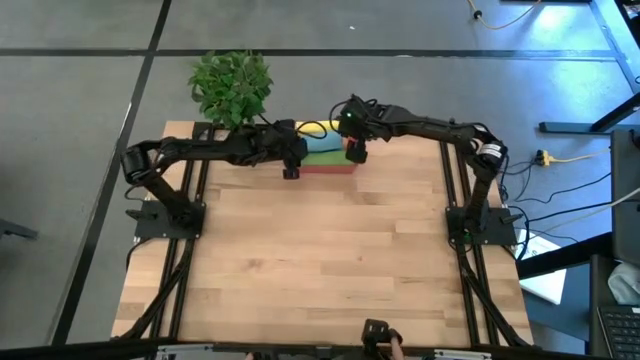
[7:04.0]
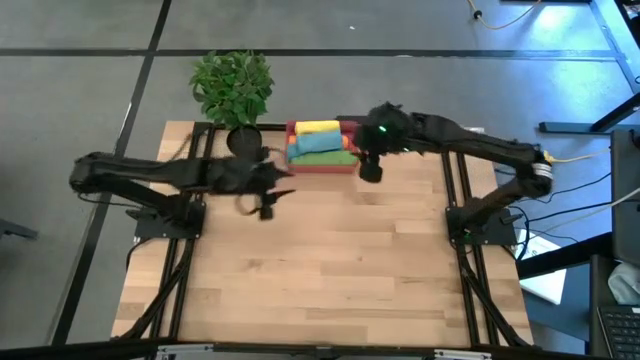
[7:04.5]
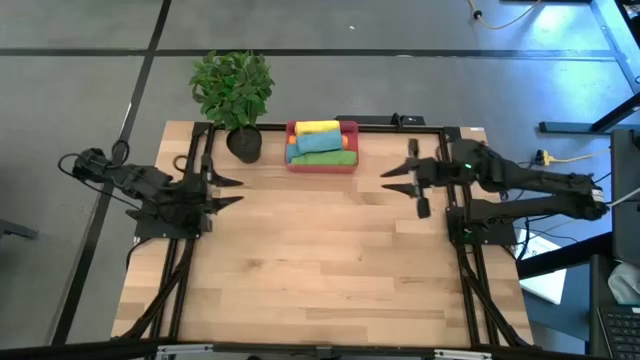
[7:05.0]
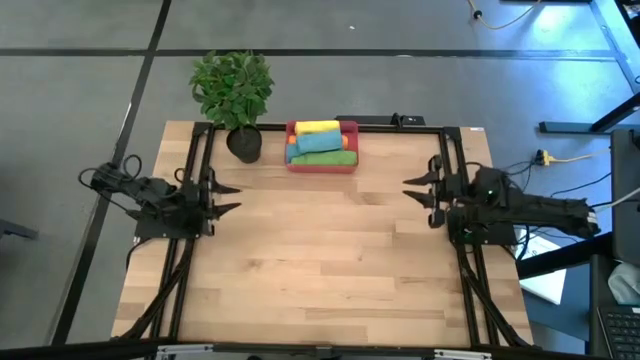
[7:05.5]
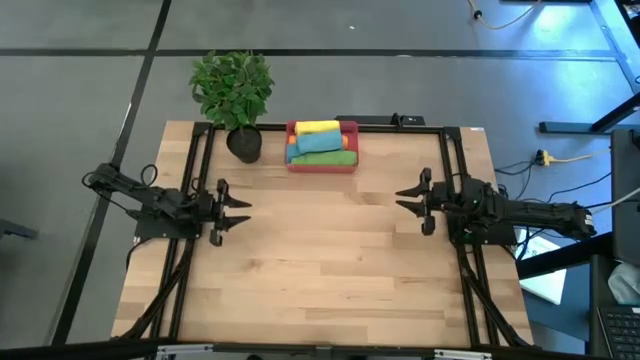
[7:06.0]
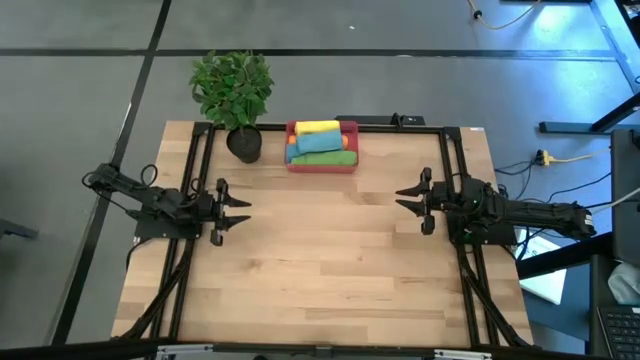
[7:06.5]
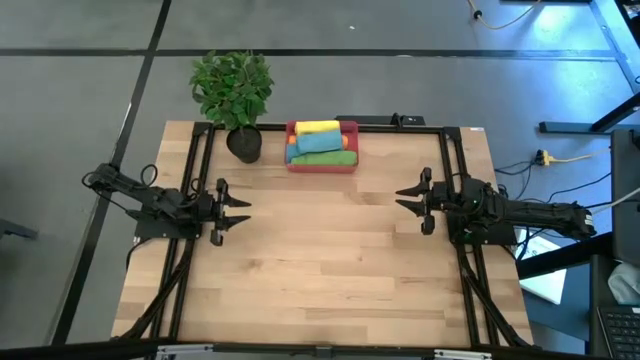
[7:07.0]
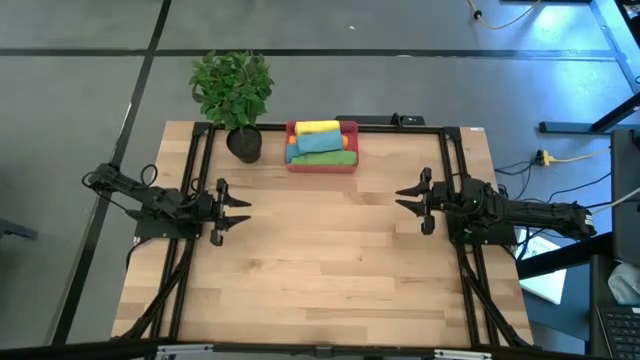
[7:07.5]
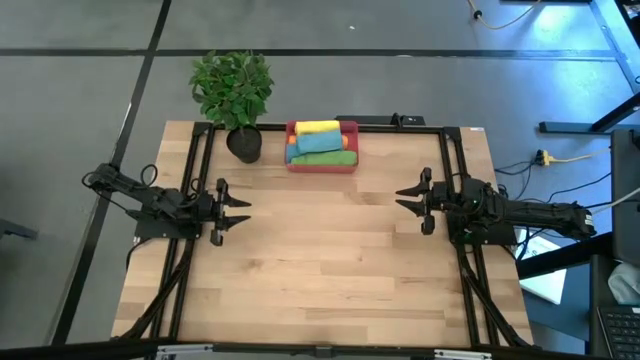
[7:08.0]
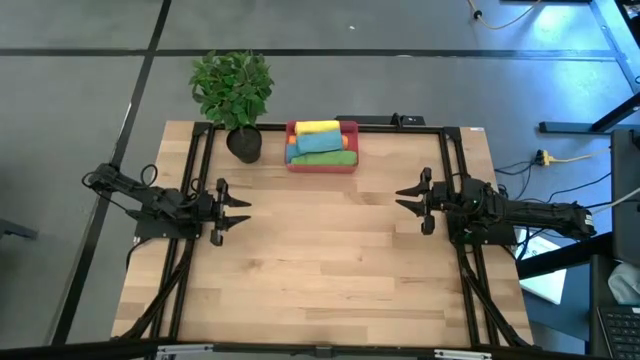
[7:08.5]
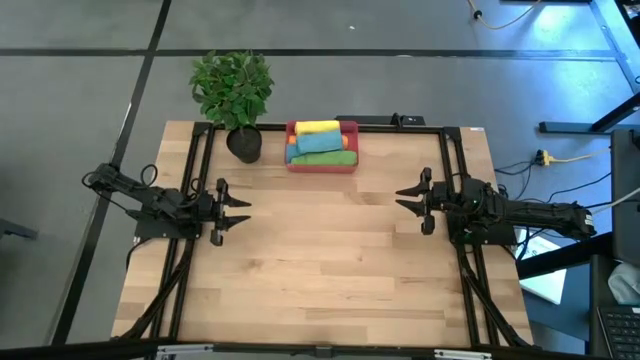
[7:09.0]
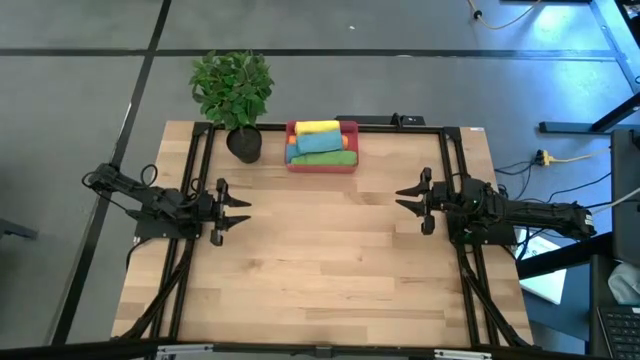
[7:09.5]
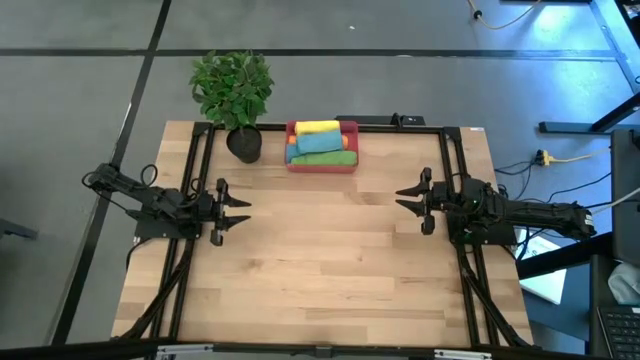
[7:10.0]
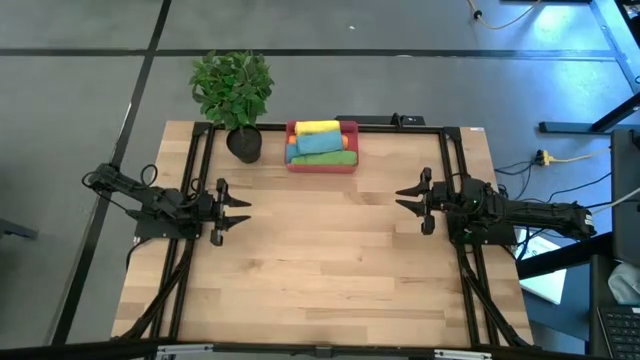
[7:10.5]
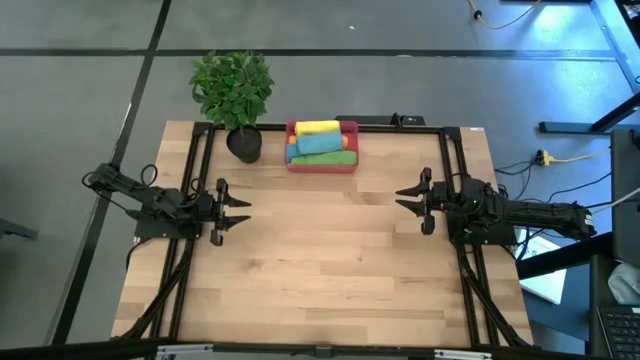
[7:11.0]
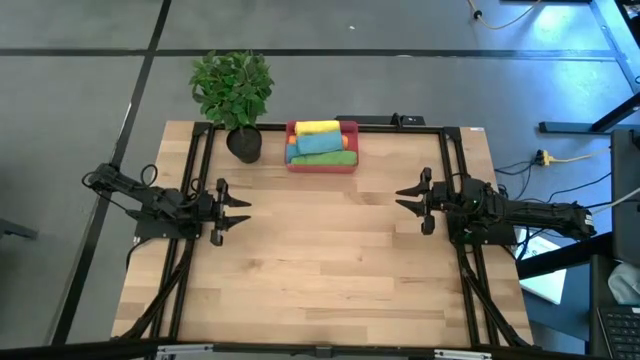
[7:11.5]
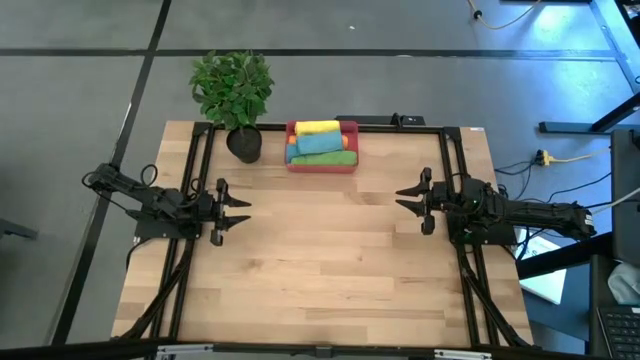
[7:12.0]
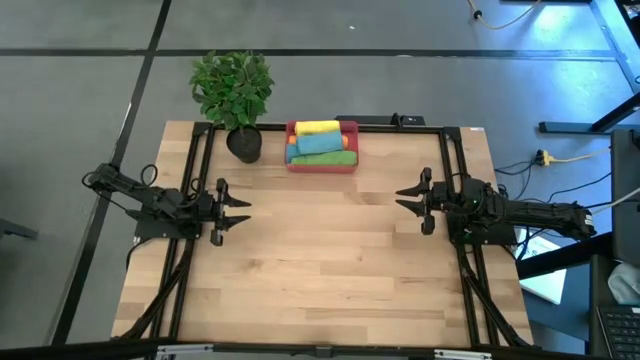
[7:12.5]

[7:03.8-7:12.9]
Task: Roll microfiber towels into tight, uniform cylinder then place into a basket
Return to Home Position

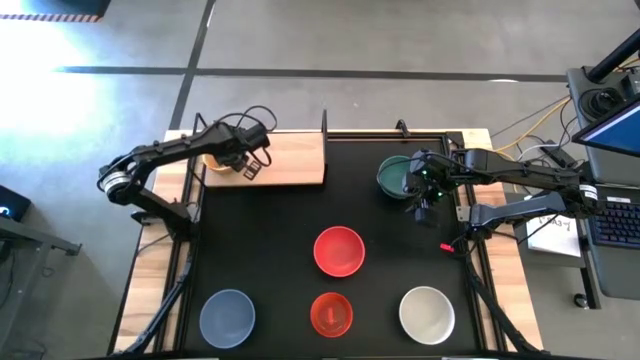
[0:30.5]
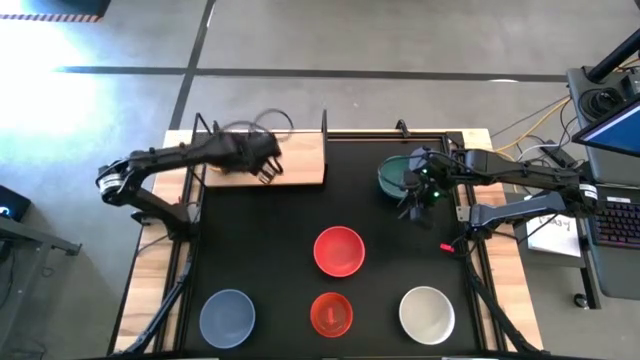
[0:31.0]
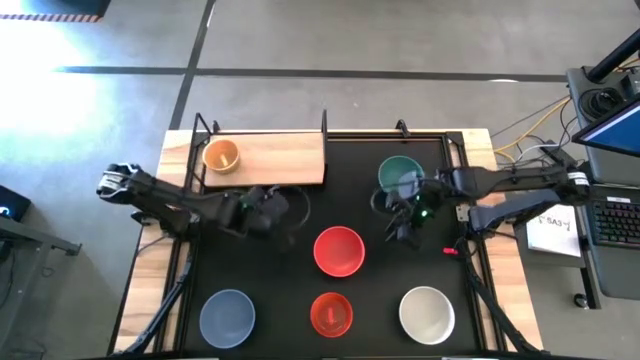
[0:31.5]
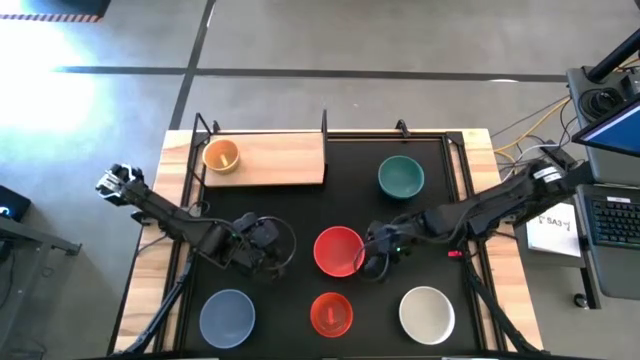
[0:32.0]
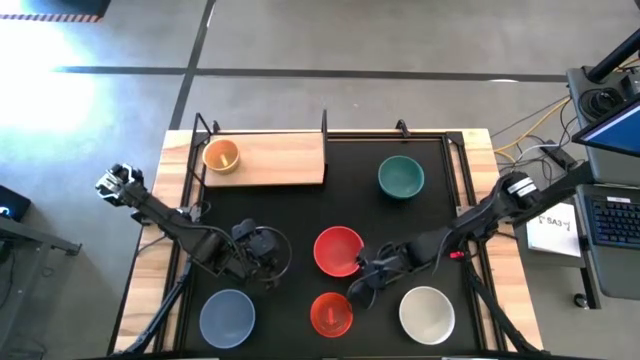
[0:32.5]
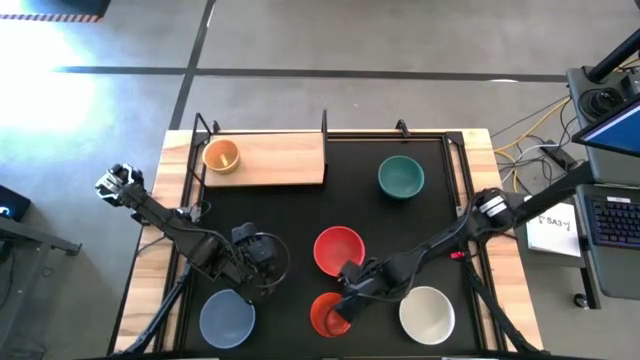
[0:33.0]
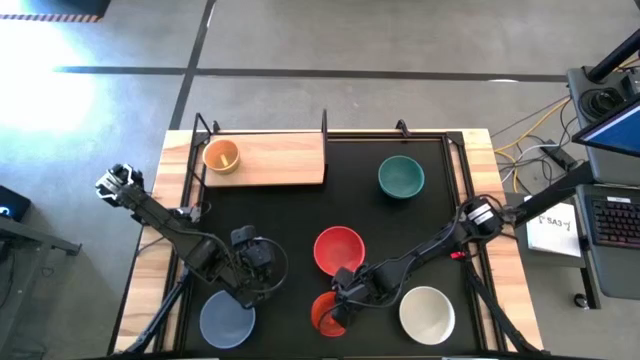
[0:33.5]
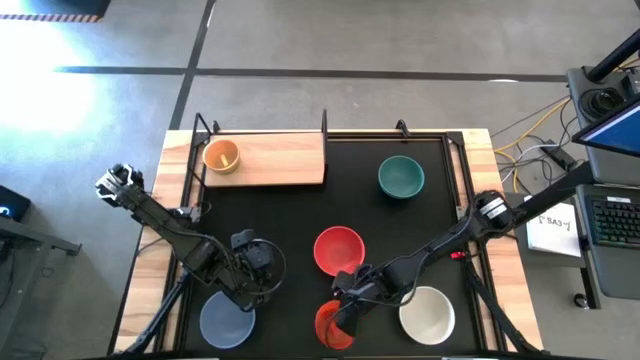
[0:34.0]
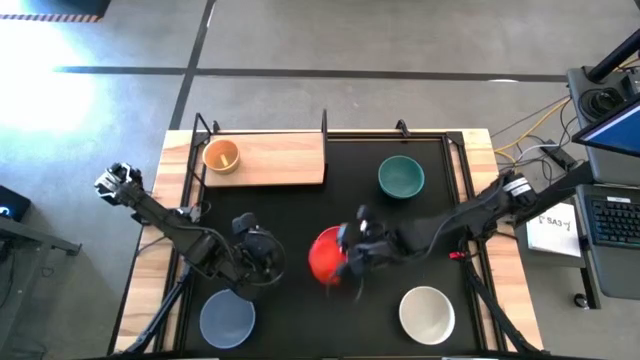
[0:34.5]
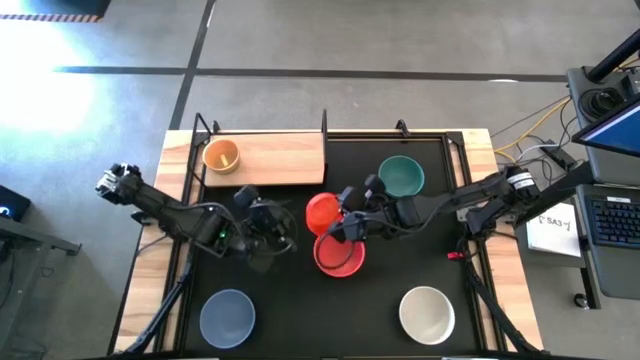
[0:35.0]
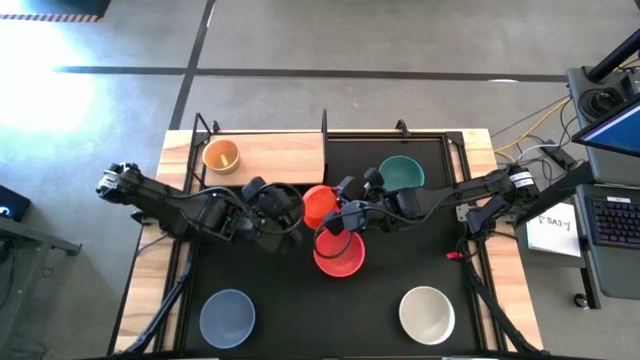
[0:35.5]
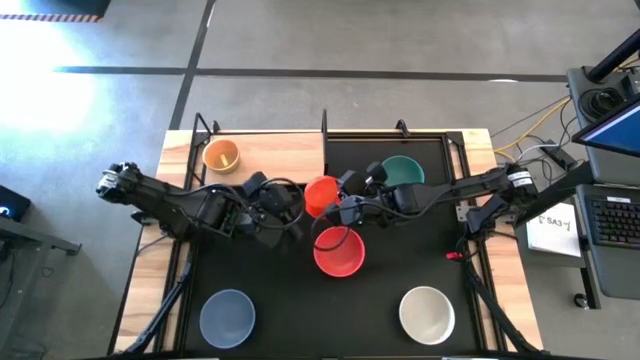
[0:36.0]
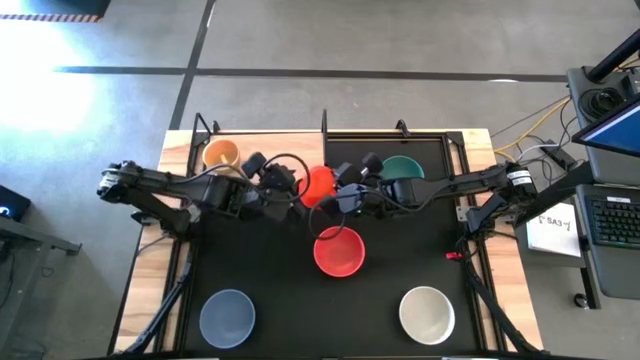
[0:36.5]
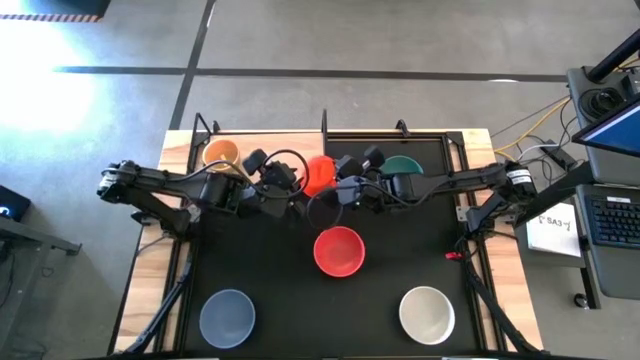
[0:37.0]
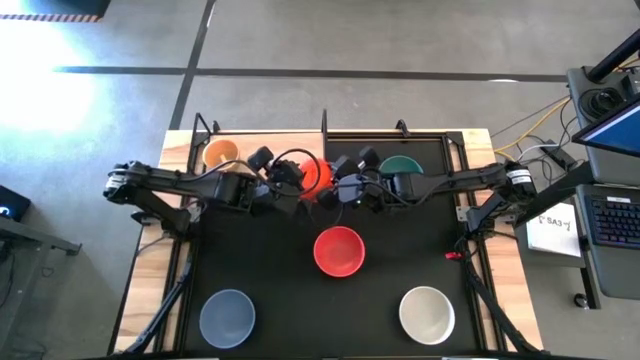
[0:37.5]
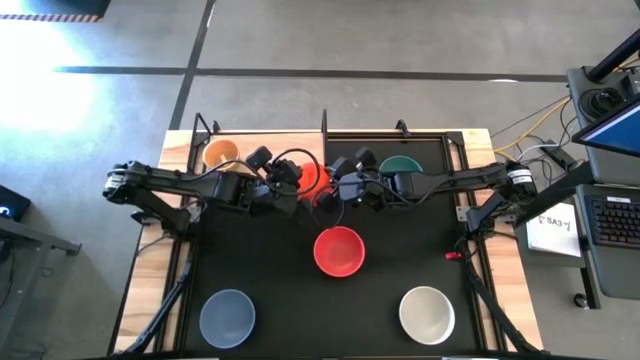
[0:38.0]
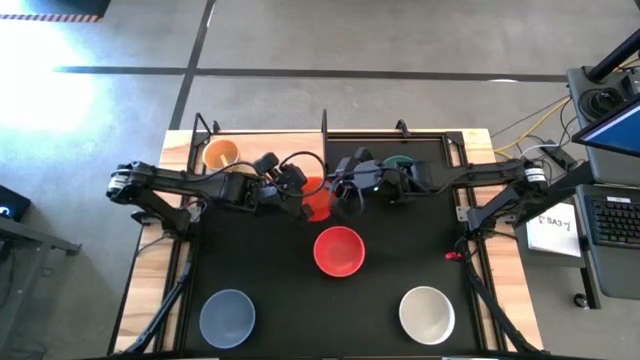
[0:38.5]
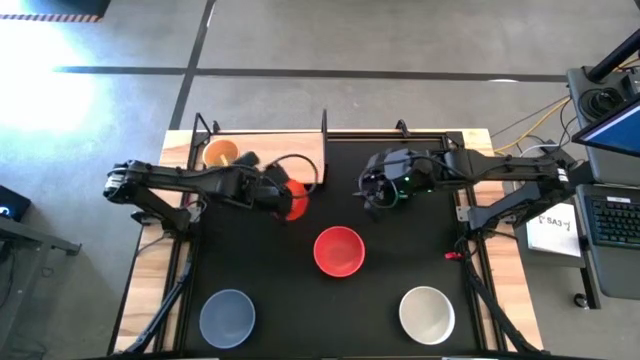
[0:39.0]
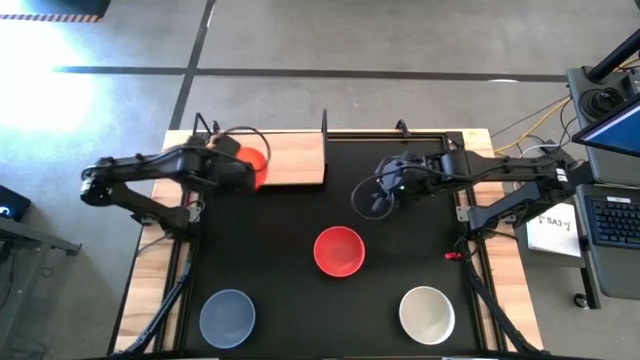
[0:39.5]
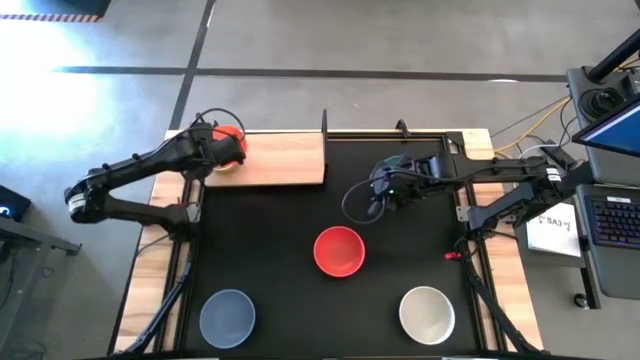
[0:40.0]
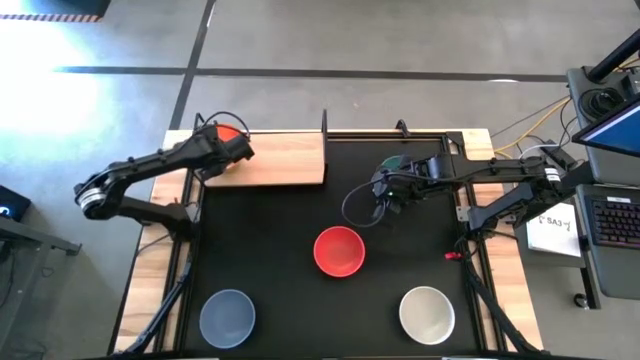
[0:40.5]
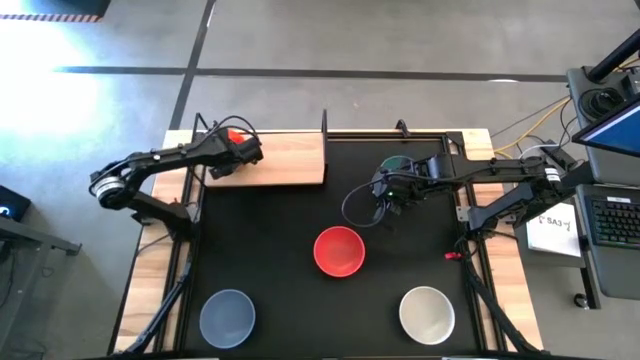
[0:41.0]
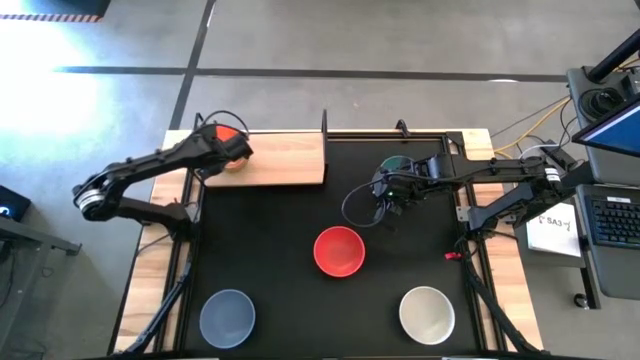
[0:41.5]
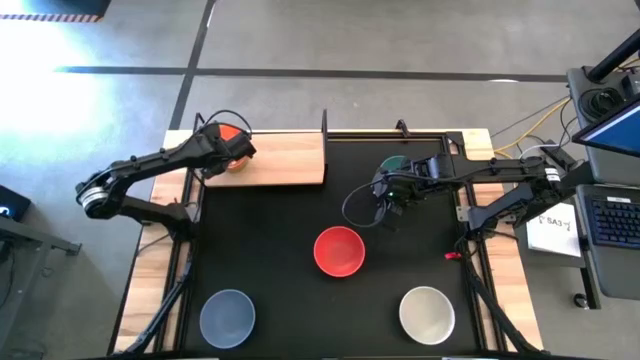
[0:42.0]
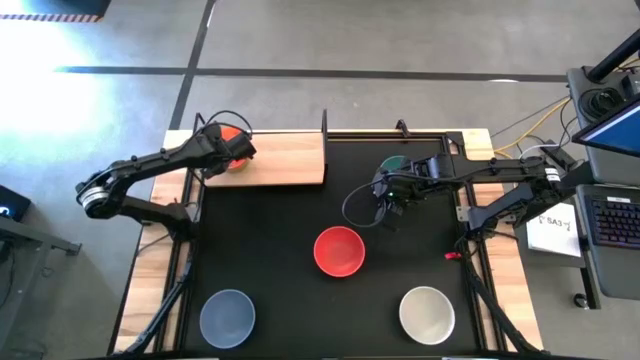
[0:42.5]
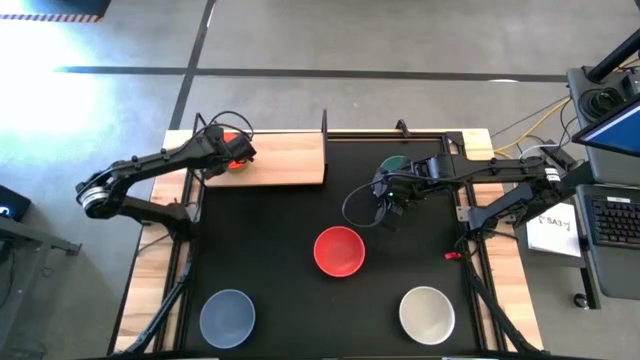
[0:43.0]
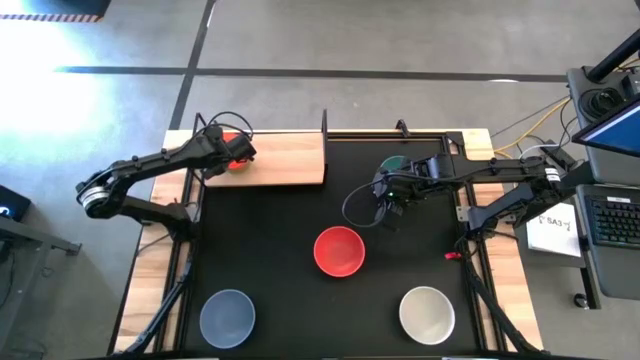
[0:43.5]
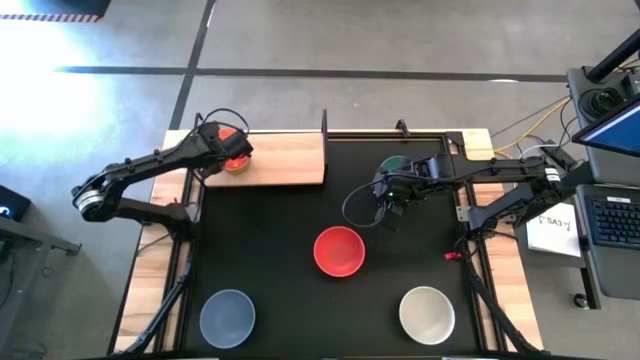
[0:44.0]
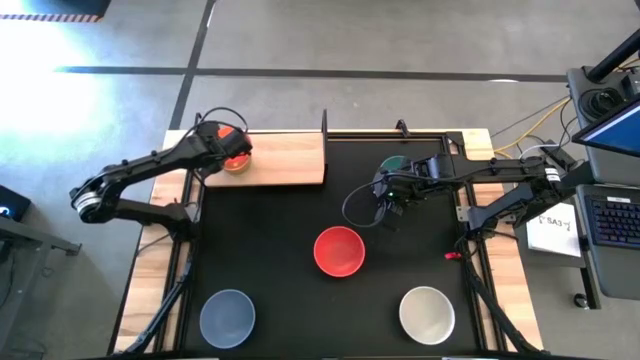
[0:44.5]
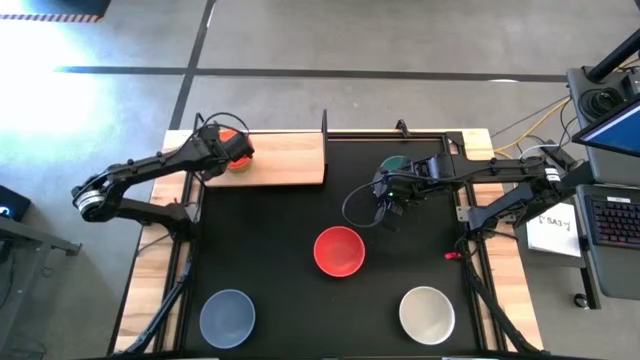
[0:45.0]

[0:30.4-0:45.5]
Task: Place and stack bowls onto a shelf
Stack the small orange bowl onto the yellow bowl on the shelf
